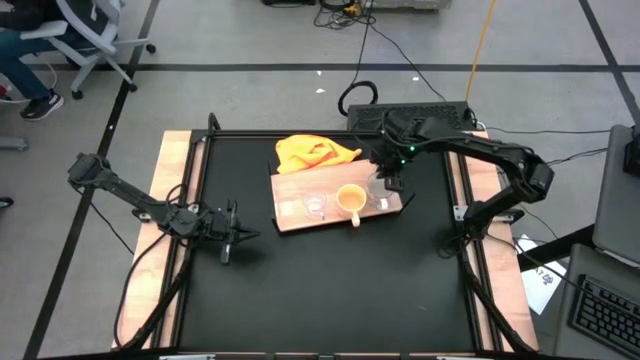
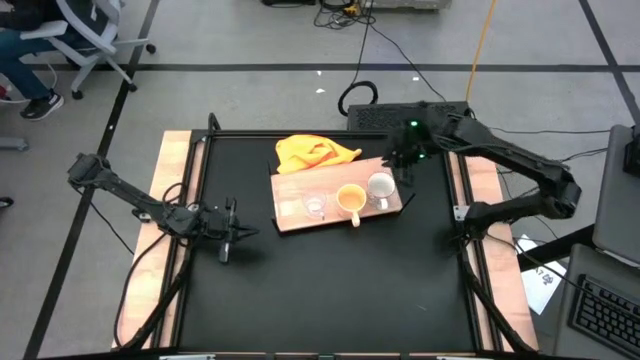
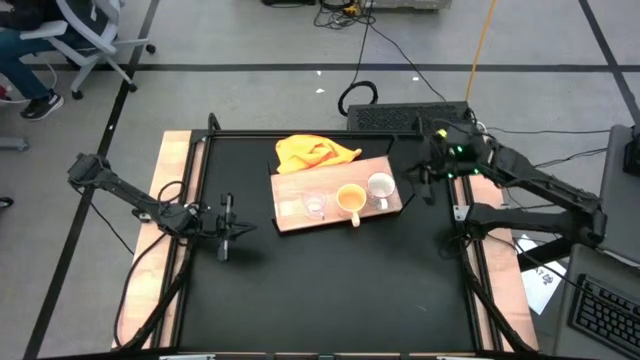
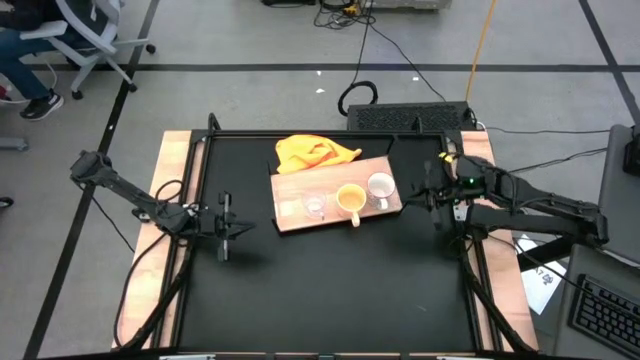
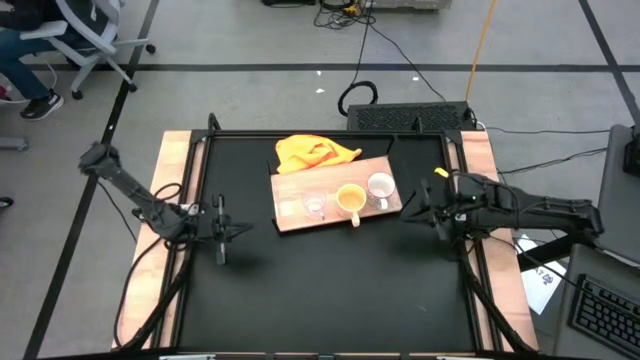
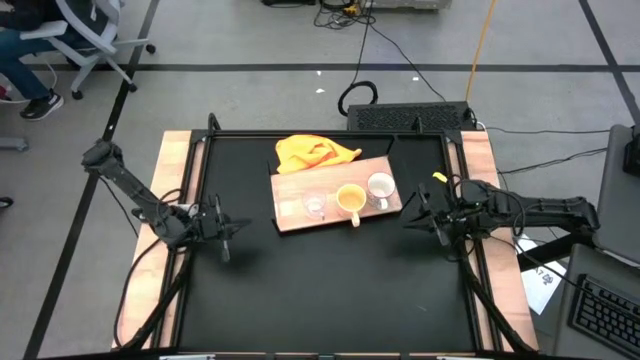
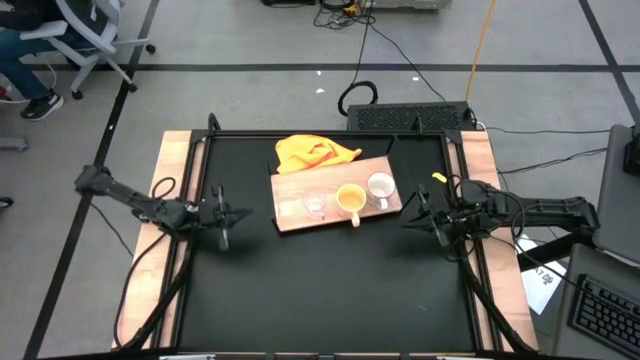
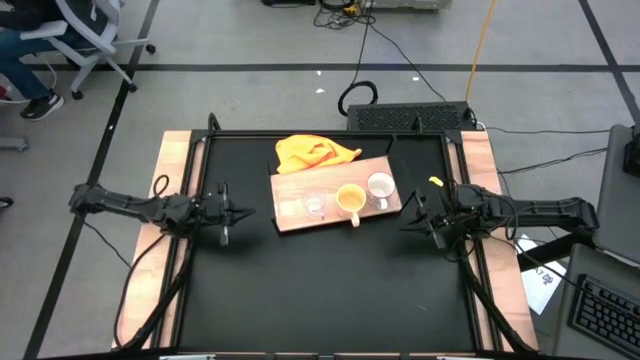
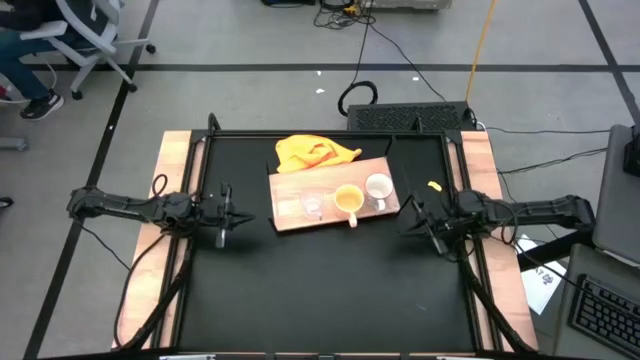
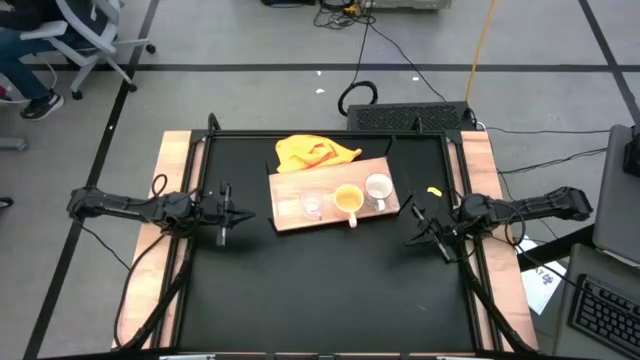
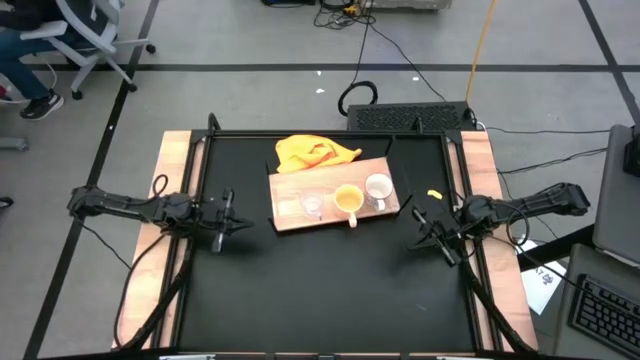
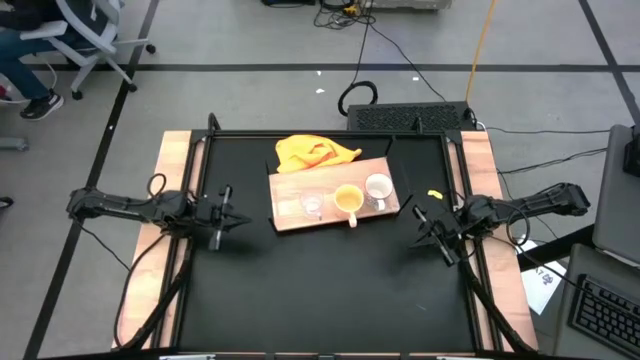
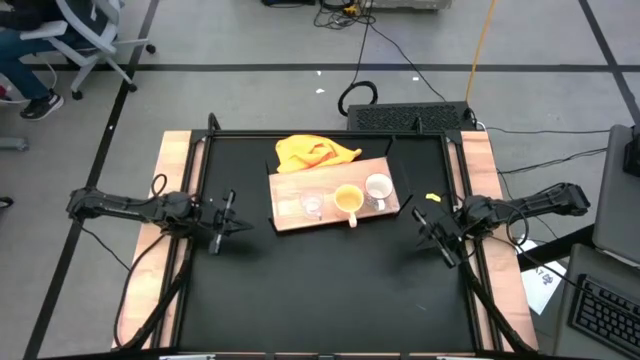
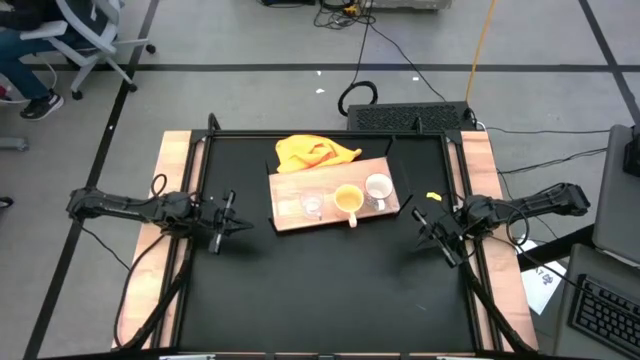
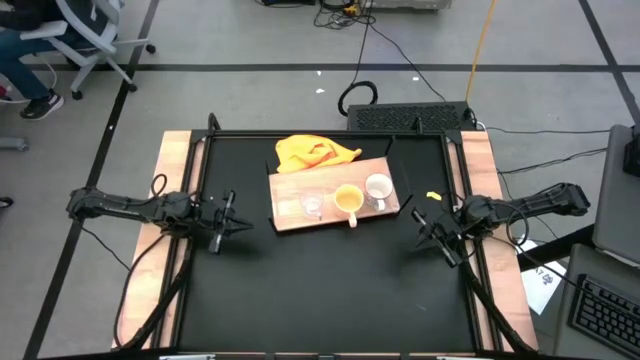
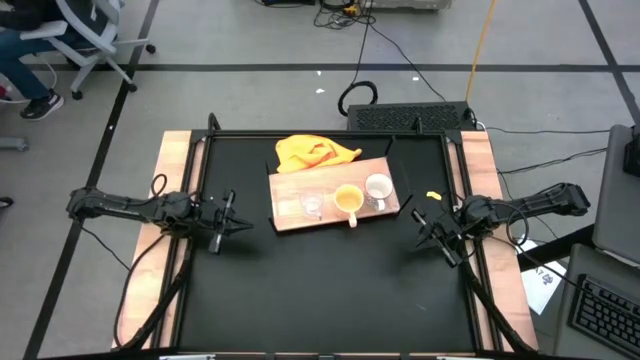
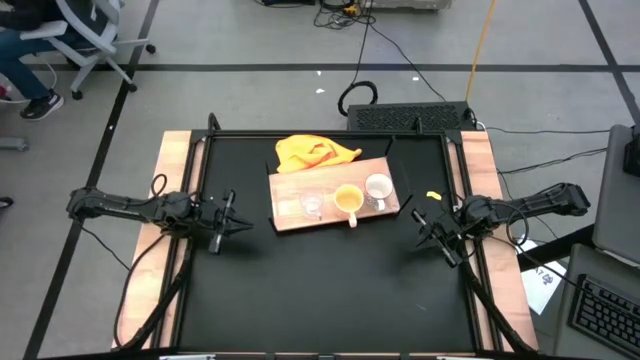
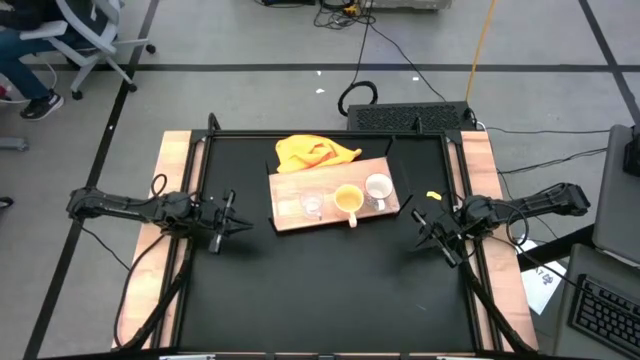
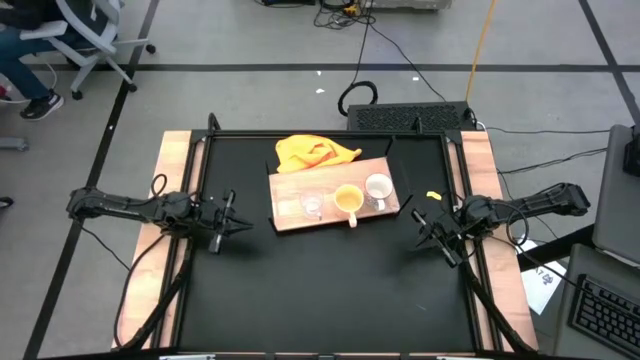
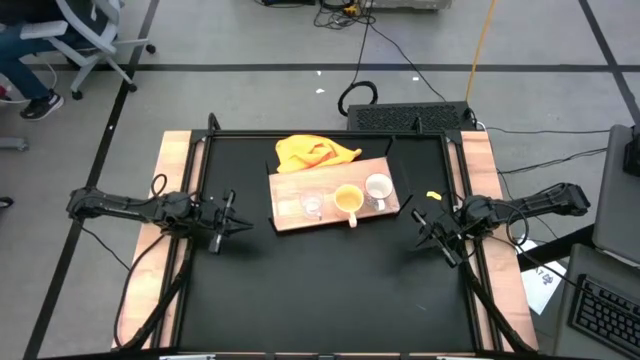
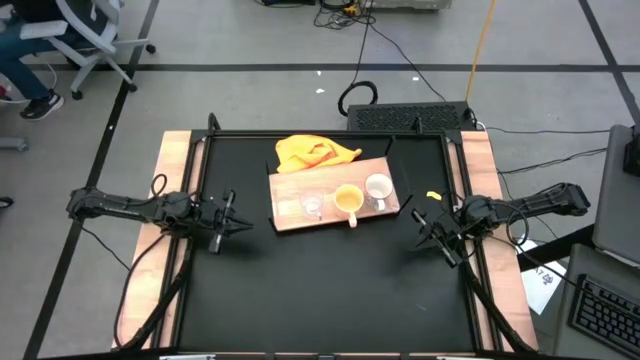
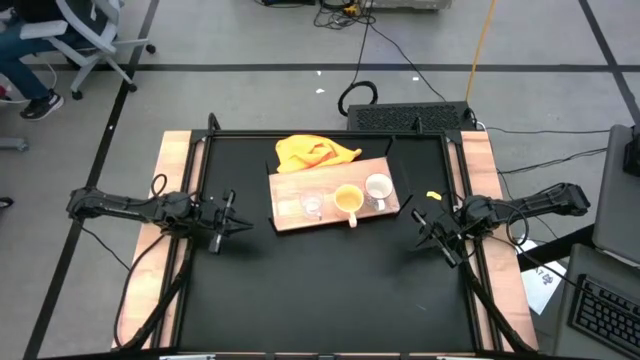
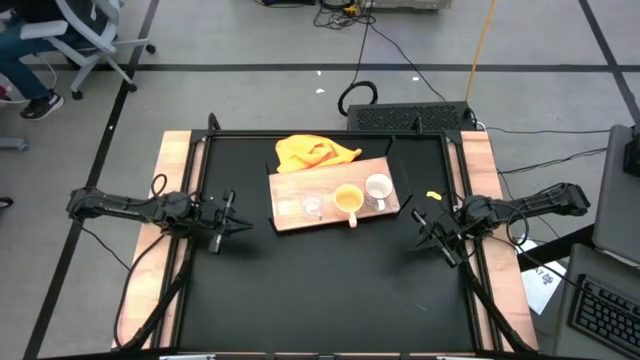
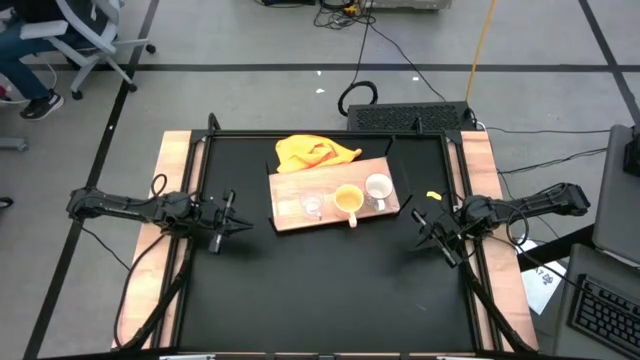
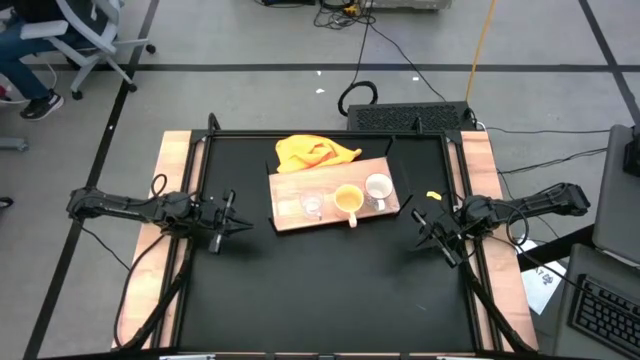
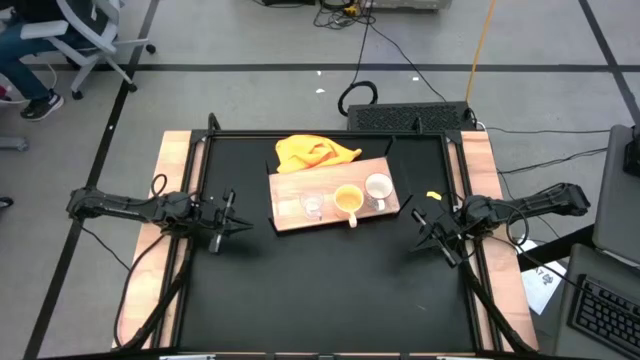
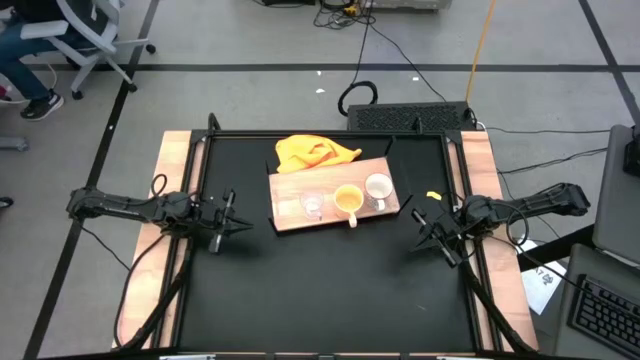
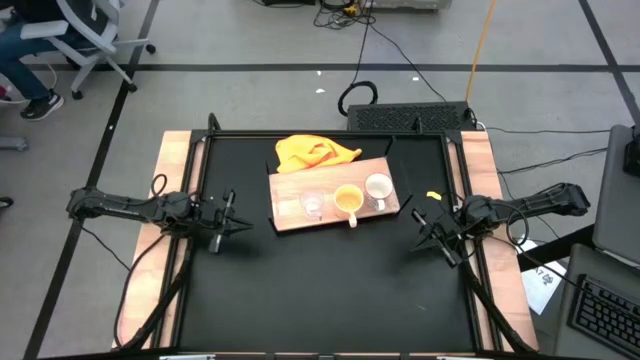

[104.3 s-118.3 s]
Task: Stack small to large cups/mugs on shelf
Return to Home Position

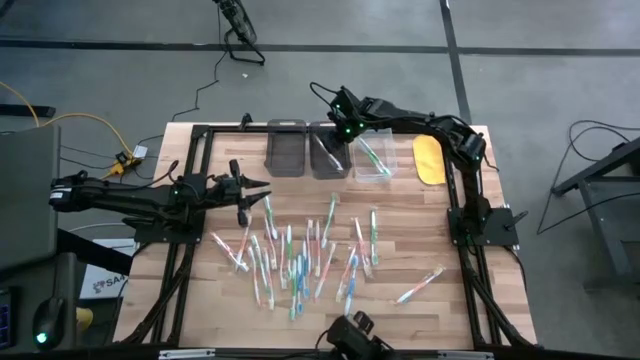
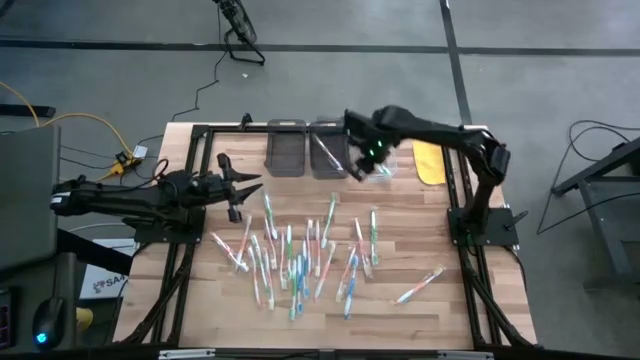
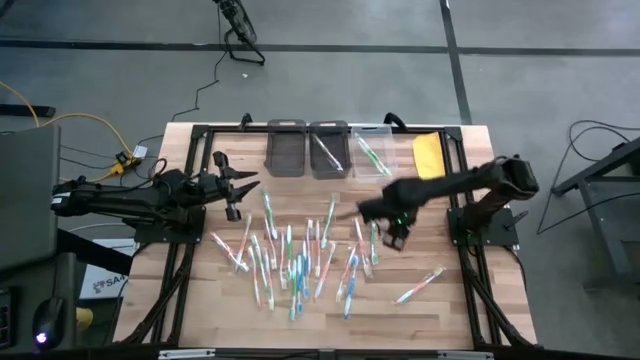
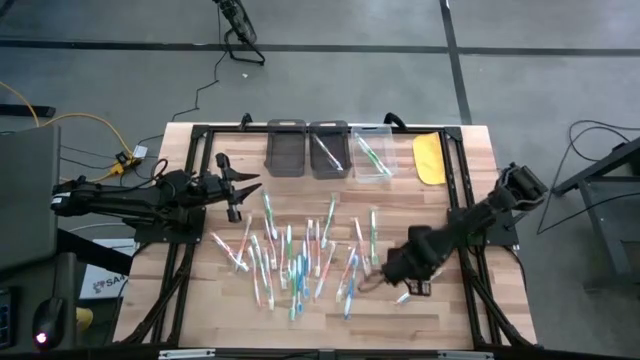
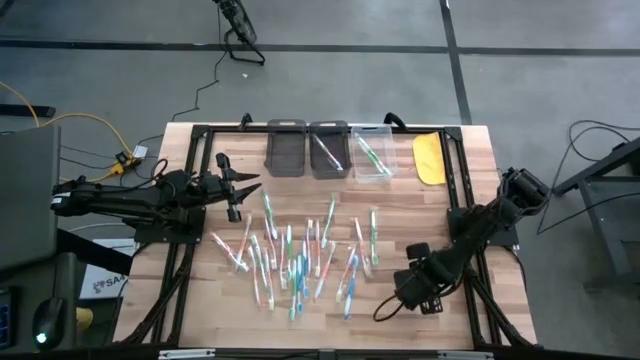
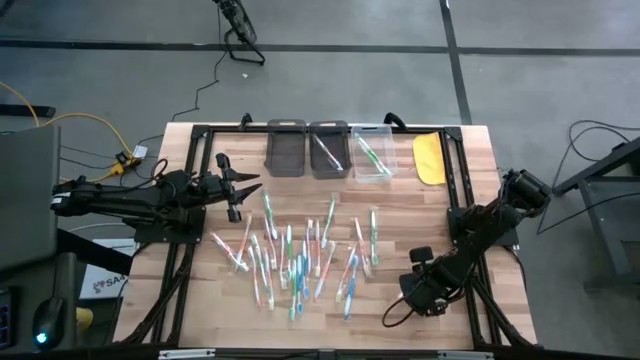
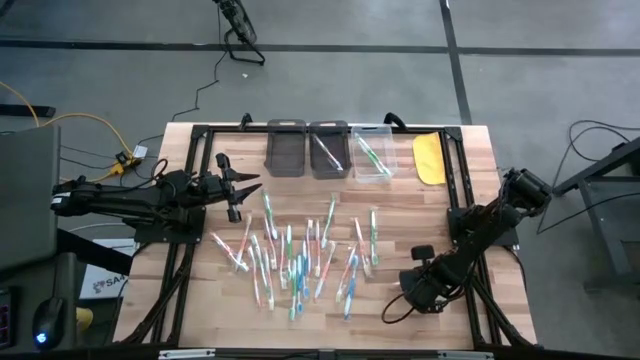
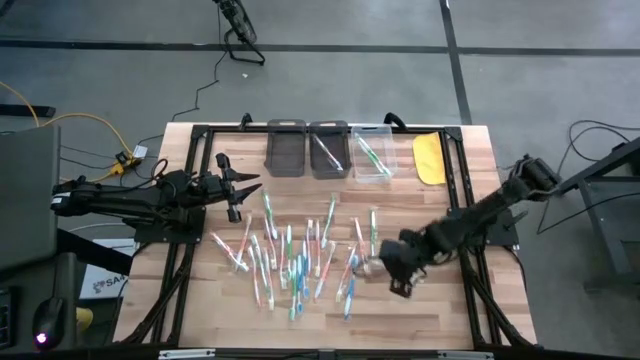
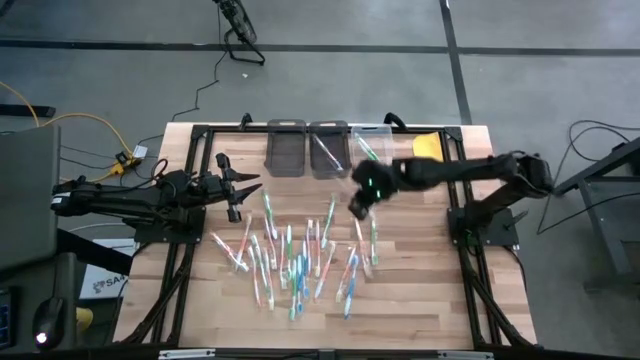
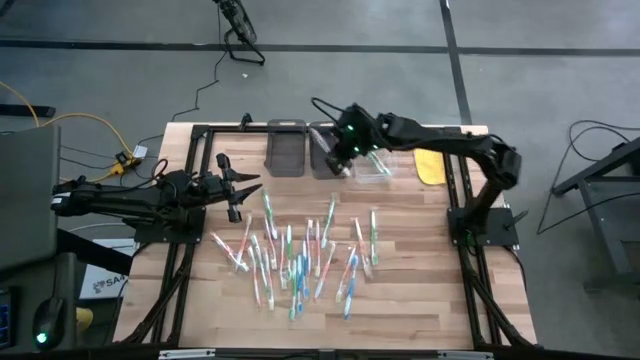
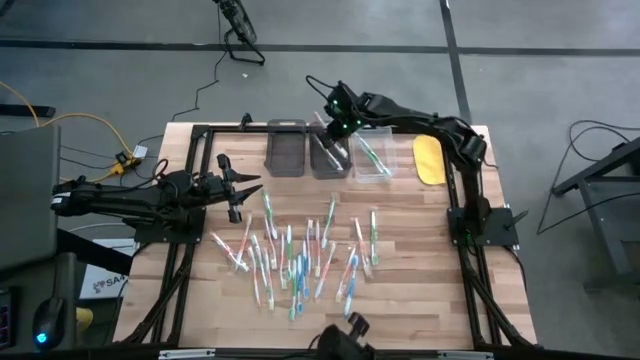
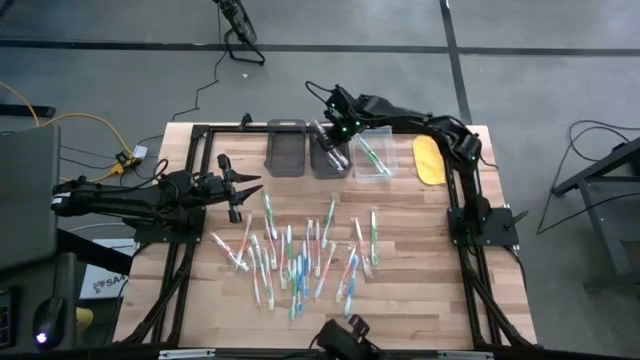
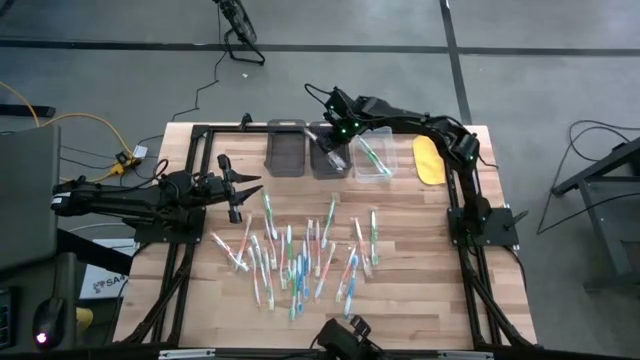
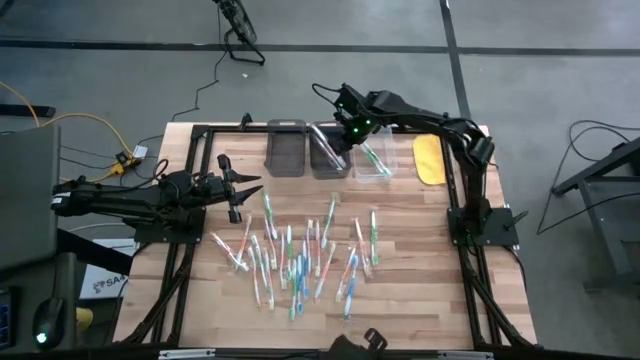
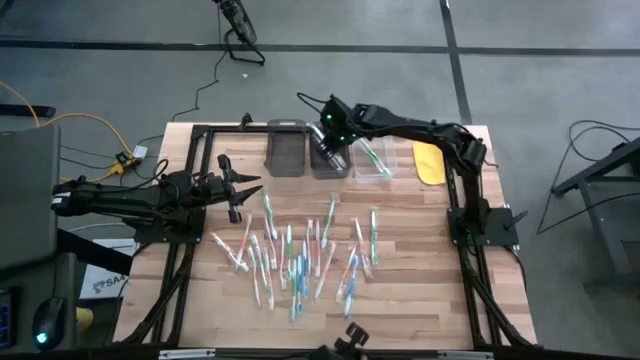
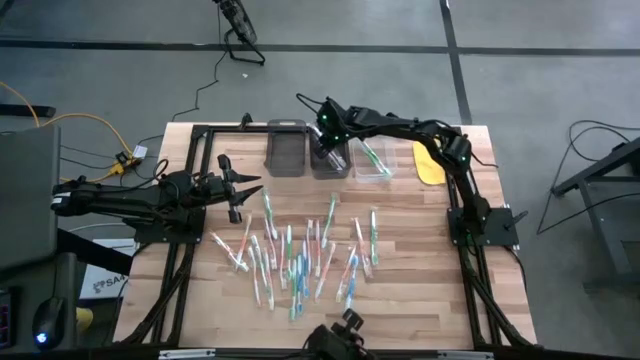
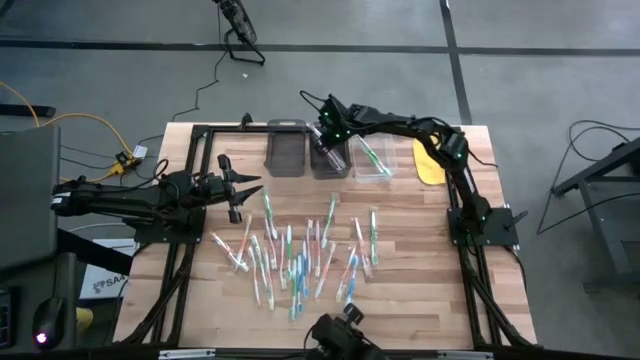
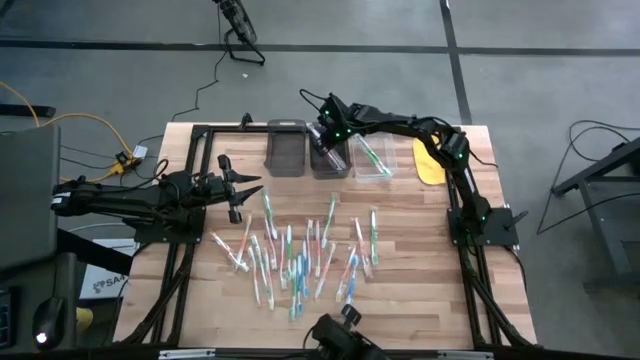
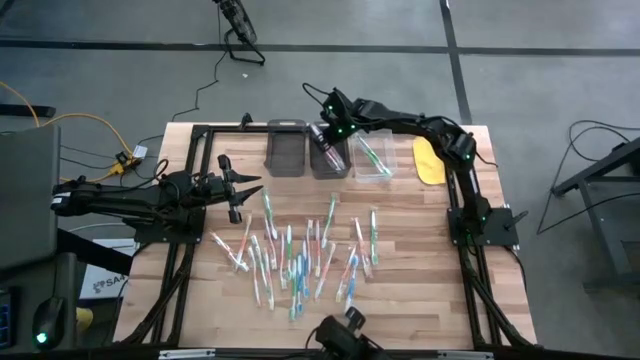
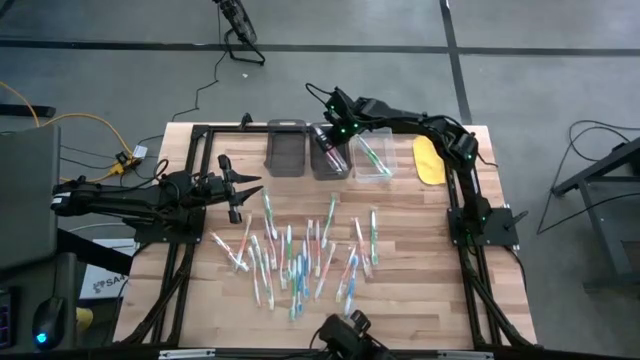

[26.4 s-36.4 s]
Task: Pick & Place Toothbrushes
Put the orange toothbrush into the right black bin
